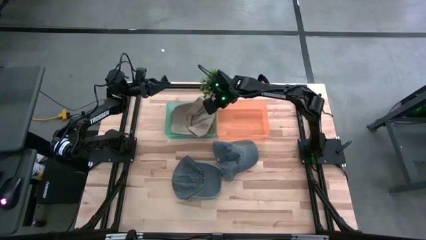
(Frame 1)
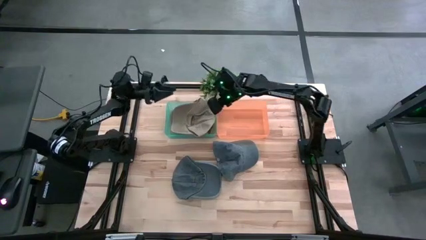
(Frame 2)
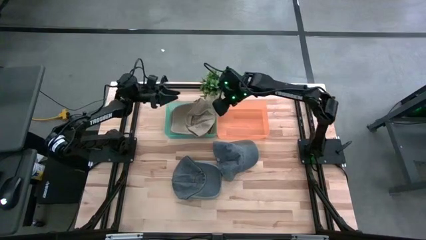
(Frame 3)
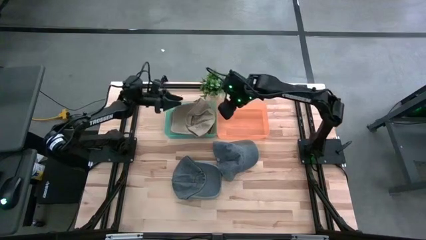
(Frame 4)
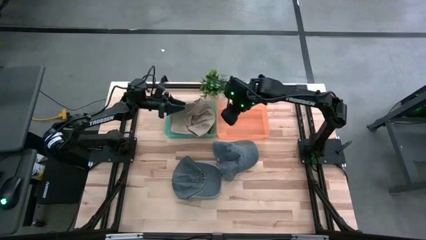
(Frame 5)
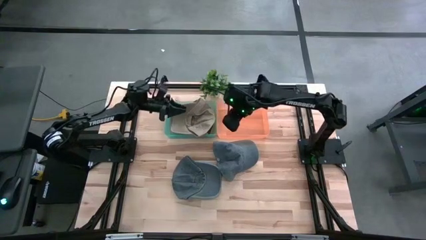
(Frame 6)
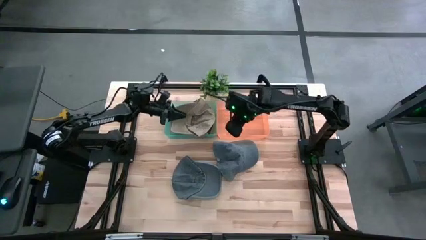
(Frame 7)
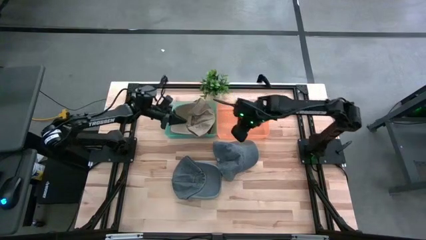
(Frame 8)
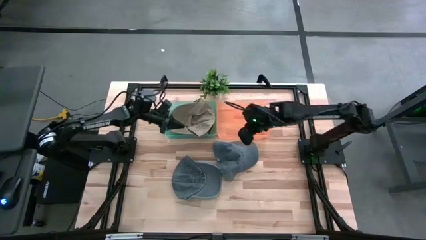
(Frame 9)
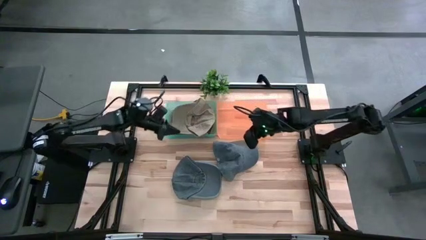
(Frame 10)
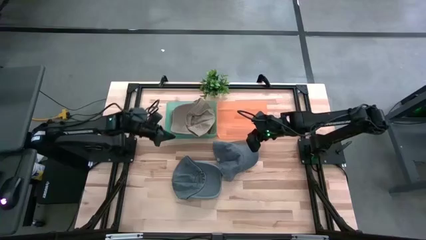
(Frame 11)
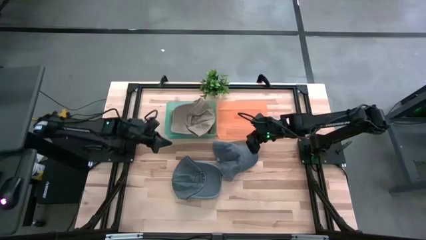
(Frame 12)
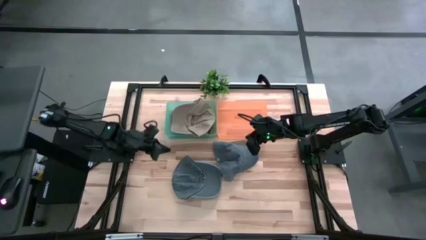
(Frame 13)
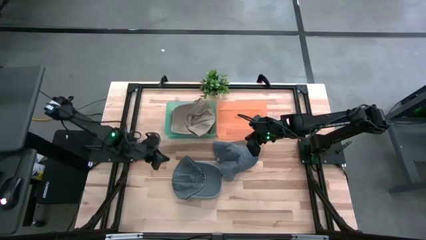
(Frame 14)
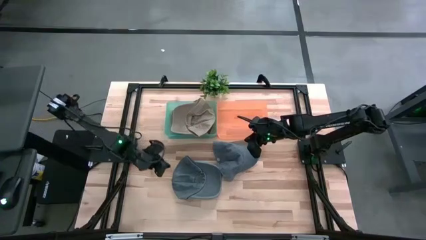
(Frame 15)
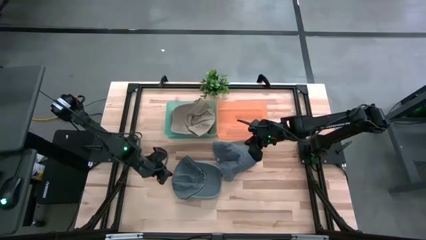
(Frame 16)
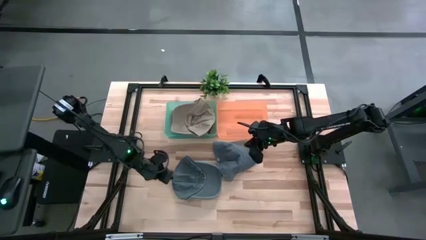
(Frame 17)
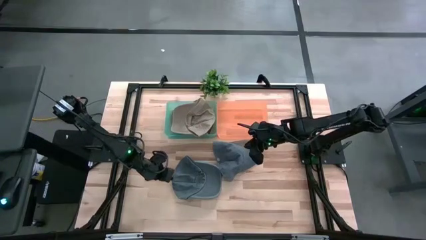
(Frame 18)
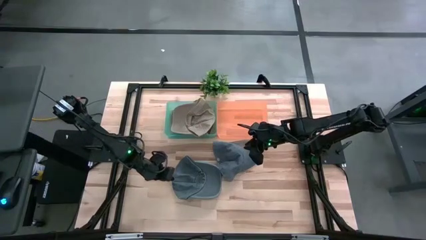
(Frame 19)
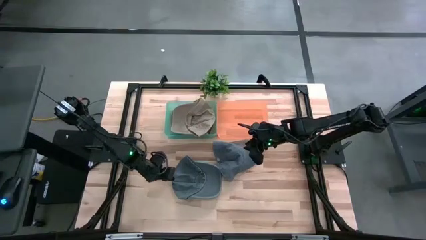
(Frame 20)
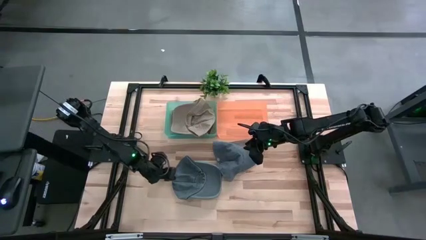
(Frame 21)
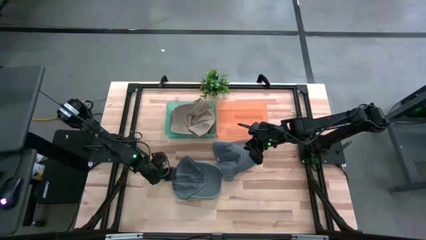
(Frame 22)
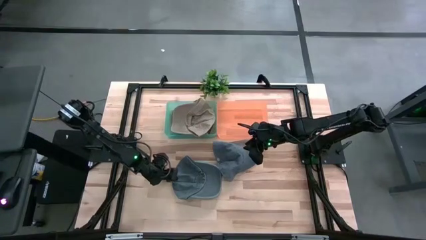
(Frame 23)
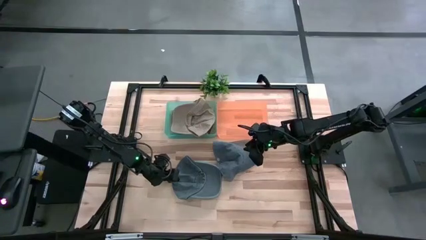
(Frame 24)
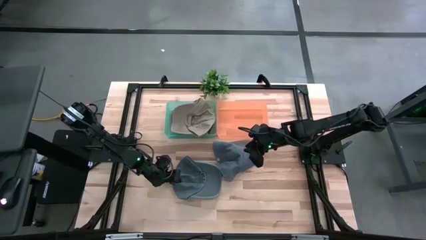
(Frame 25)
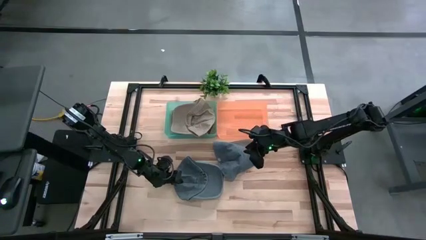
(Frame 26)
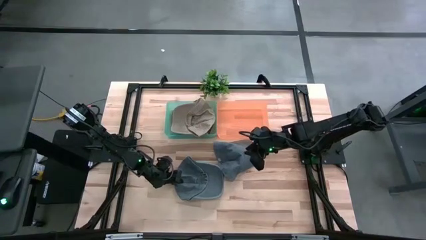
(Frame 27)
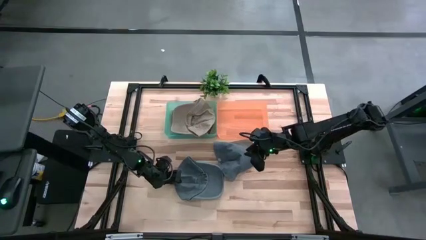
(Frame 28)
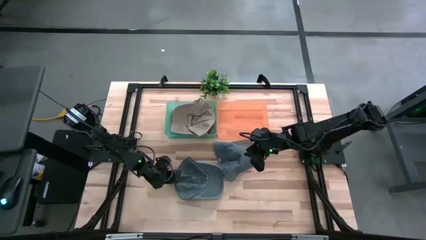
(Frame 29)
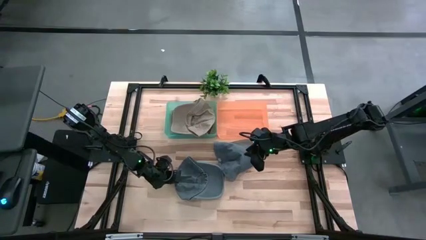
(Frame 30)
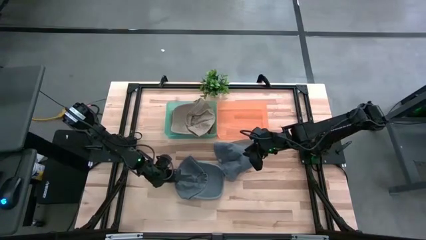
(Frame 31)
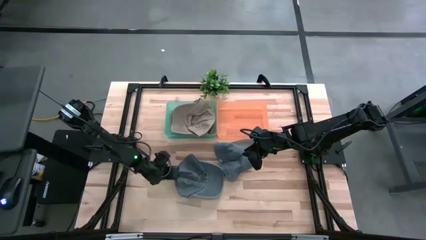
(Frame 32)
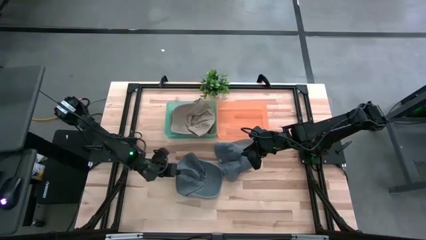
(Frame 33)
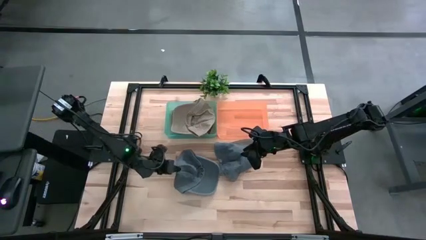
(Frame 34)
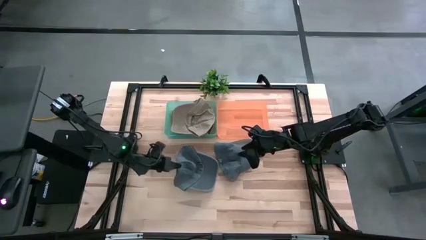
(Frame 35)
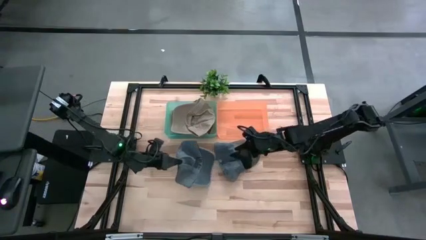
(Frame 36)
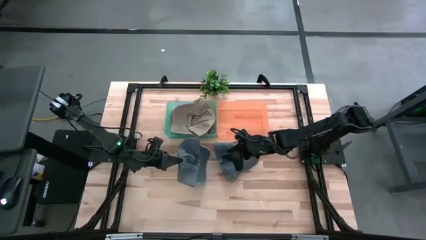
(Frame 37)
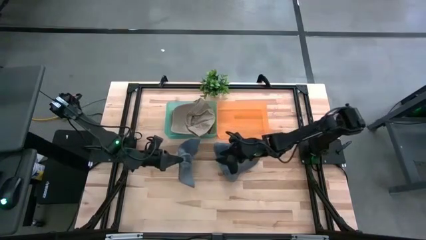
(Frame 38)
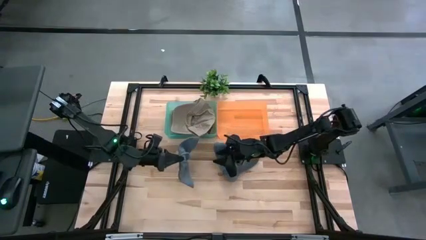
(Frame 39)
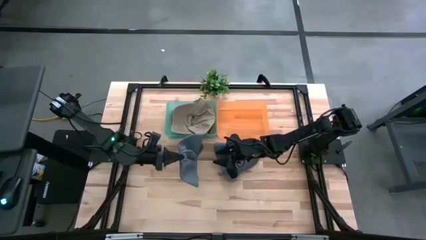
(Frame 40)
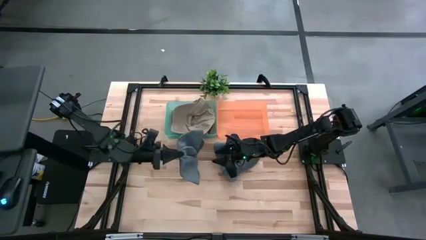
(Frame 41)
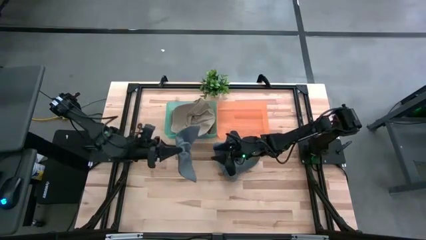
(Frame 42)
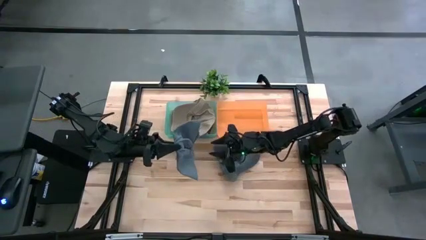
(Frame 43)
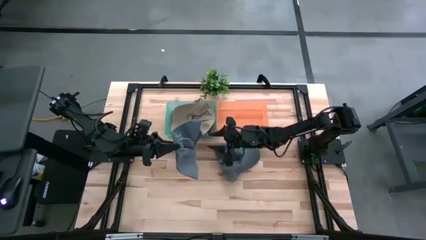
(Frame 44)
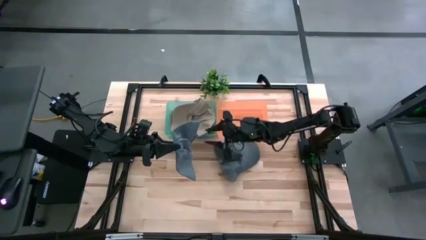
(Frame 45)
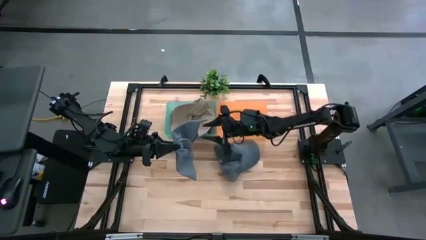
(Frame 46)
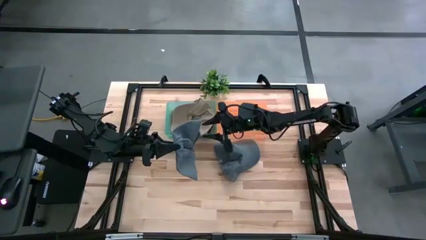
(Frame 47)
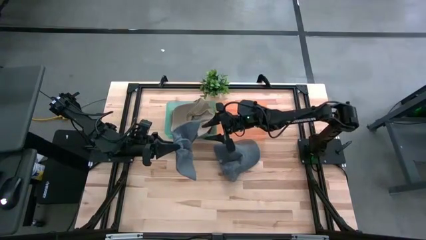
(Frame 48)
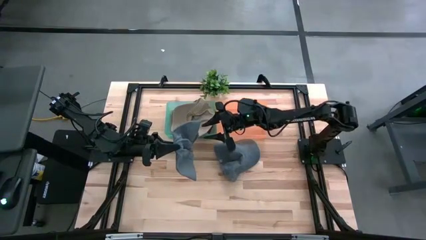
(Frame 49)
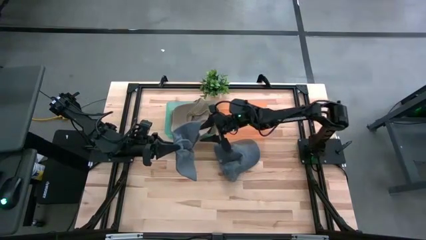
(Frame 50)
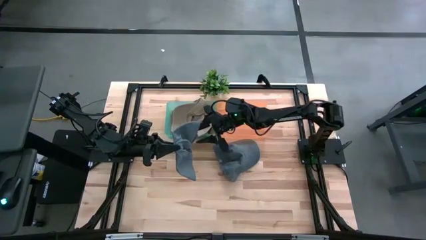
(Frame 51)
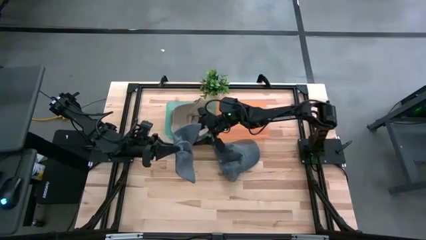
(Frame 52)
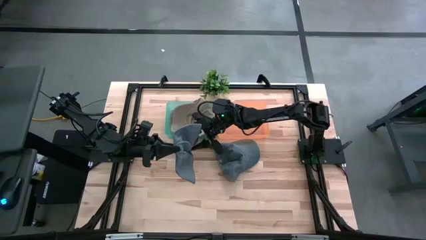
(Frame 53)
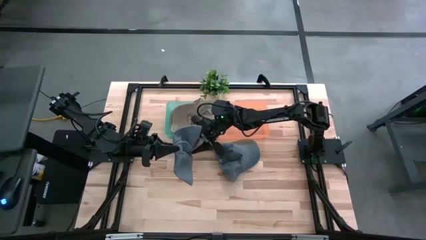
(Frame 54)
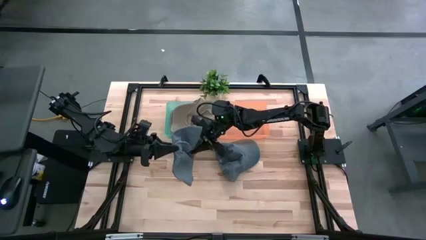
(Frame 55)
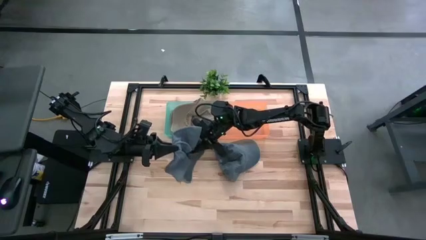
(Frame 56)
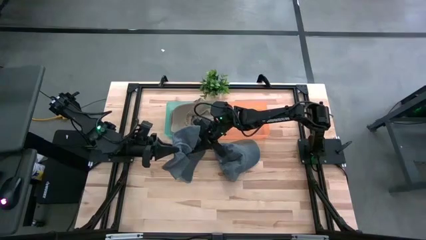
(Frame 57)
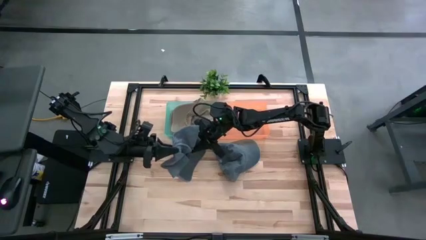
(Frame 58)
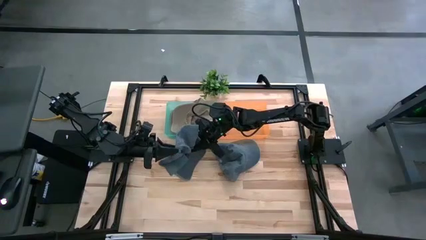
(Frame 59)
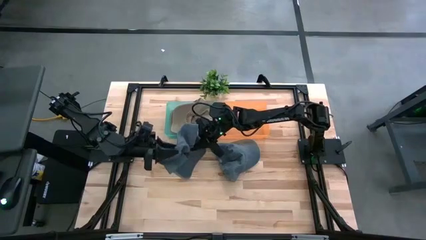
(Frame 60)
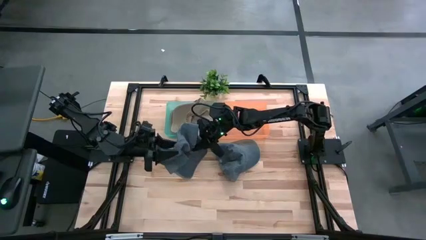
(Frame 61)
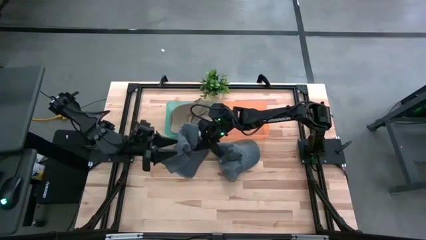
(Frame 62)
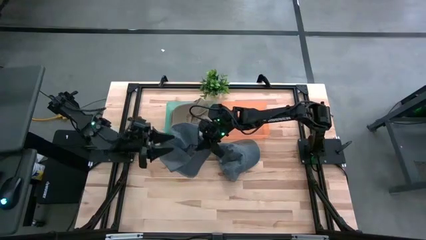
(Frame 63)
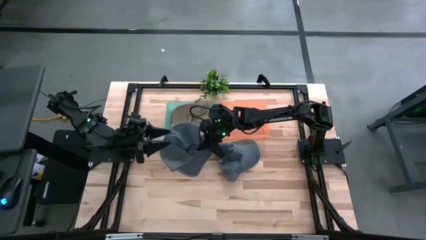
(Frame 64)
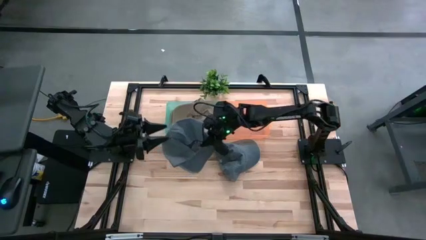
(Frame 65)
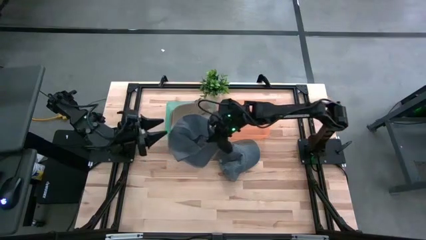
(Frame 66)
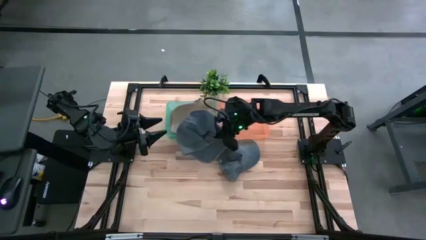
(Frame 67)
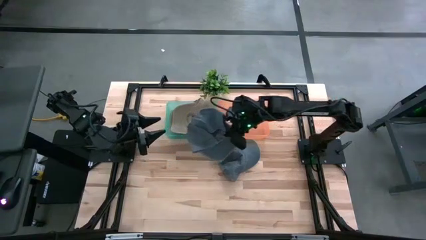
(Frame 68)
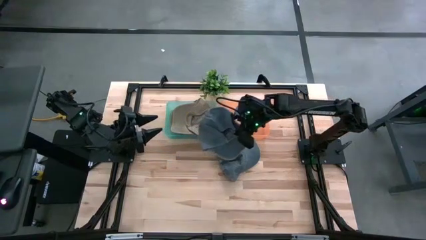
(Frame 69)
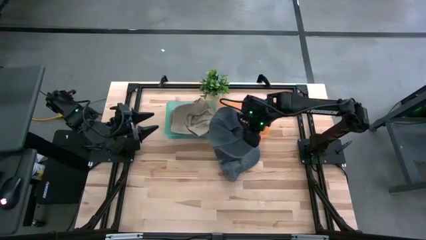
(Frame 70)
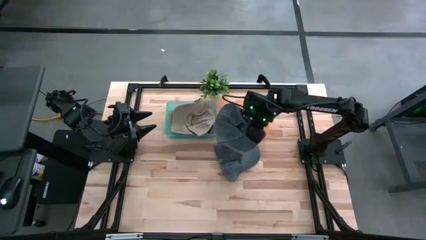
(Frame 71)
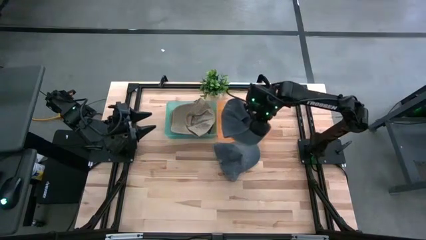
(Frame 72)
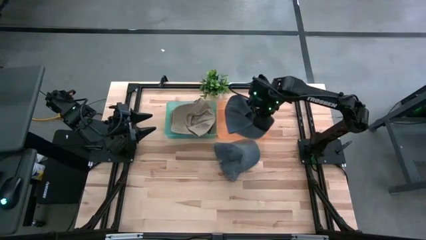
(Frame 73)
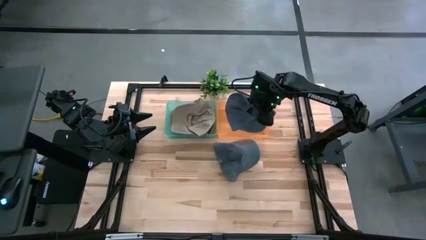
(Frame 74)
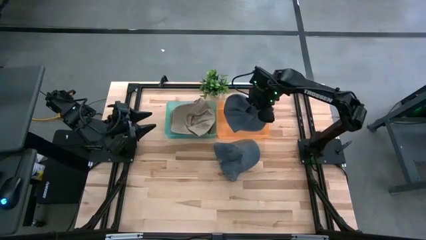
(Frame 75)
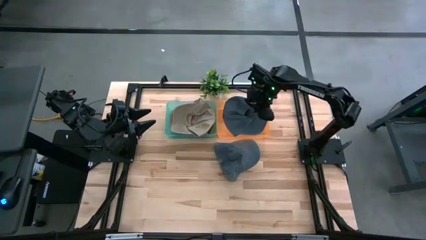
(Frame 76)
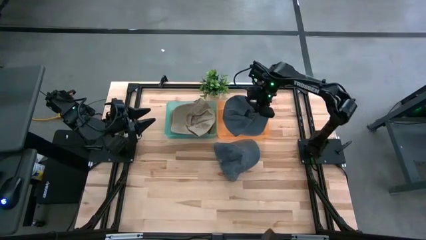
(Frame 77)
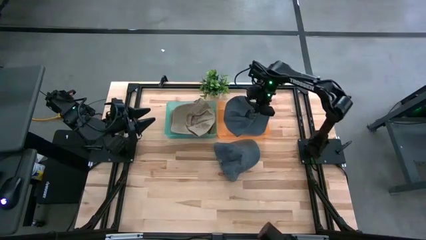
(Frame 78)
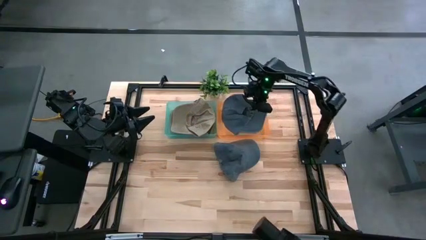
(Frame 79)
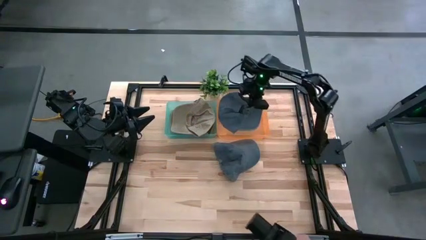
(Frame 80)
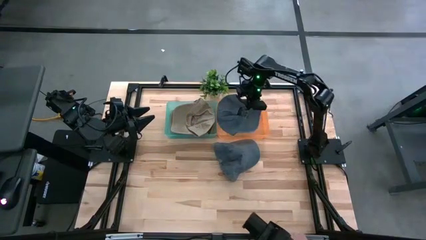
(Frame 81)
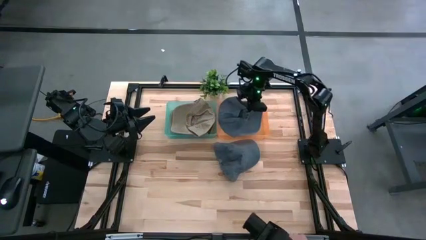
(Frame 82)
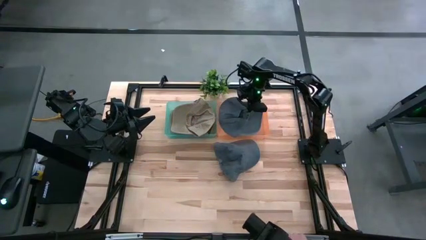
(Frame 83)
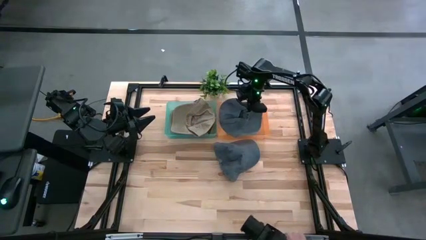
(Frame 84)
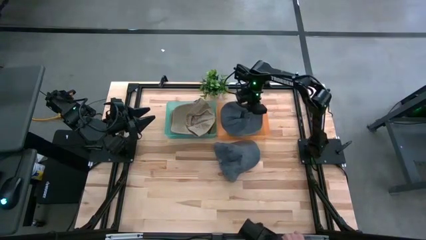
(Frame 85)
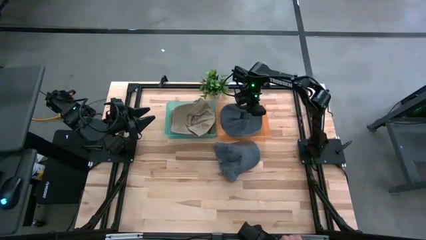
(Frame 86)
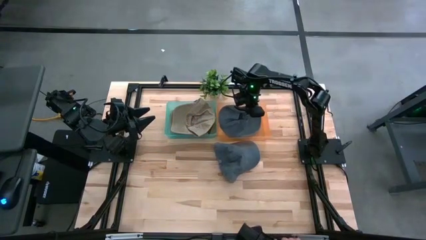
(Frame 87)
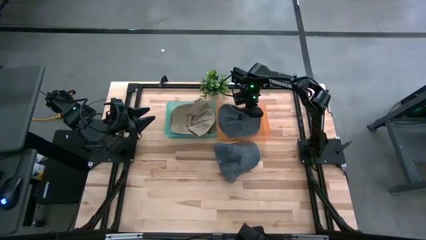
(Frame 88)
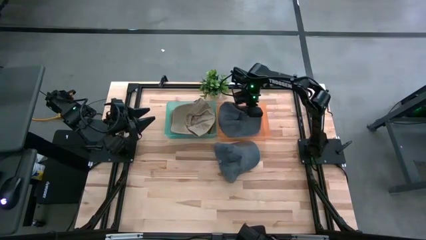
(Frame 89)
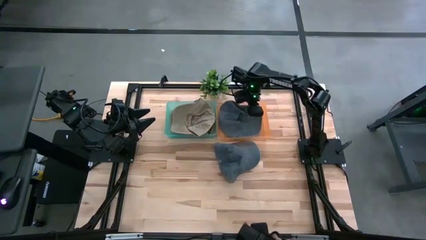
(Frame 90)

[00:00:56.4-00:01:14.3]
Task: Pick & Place hat
Put the left blue cap into the orange bin
